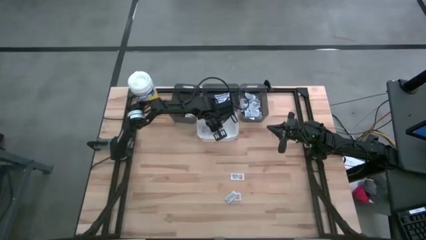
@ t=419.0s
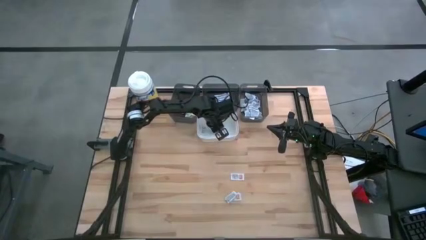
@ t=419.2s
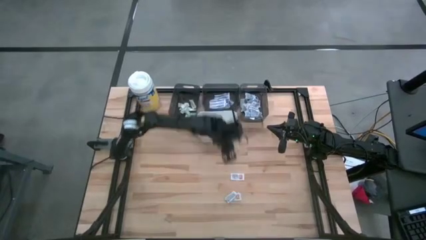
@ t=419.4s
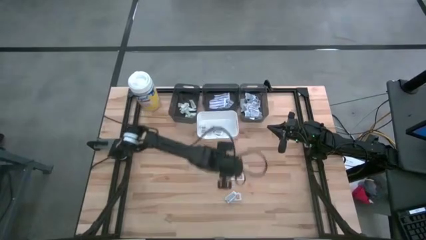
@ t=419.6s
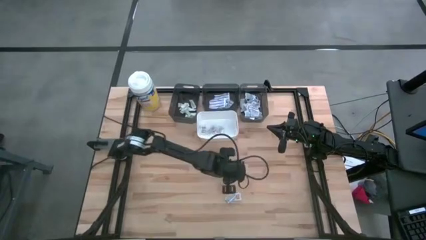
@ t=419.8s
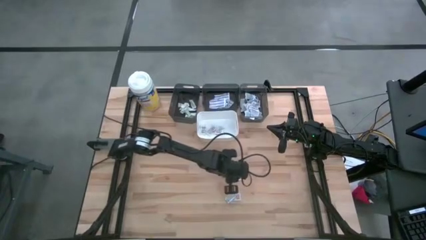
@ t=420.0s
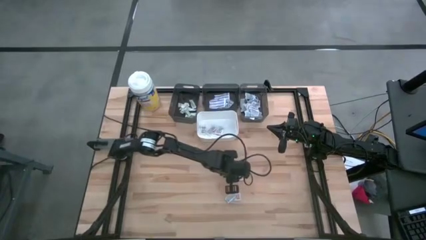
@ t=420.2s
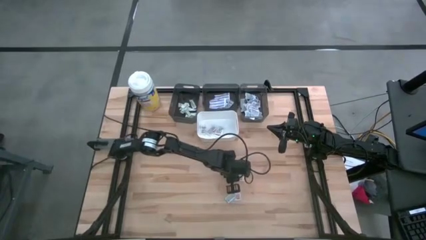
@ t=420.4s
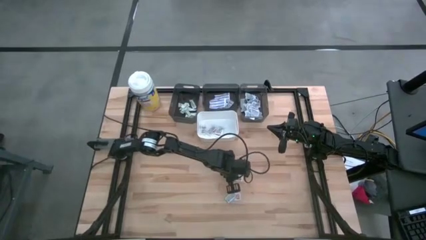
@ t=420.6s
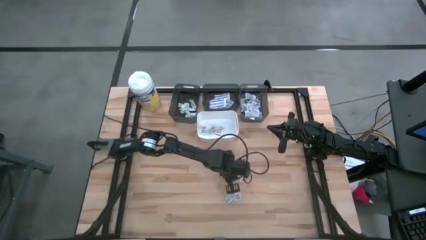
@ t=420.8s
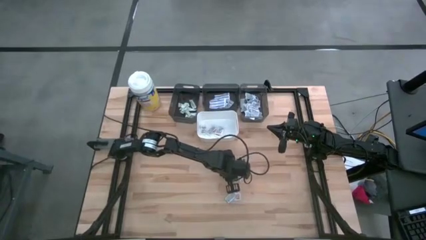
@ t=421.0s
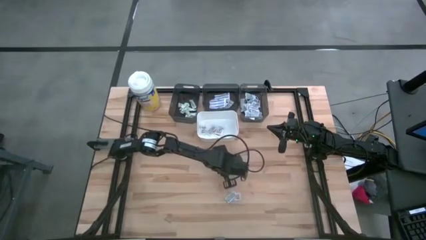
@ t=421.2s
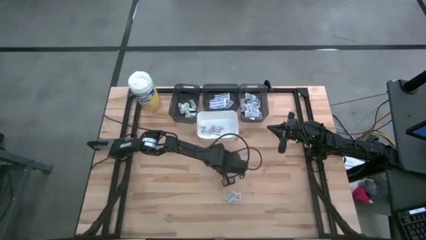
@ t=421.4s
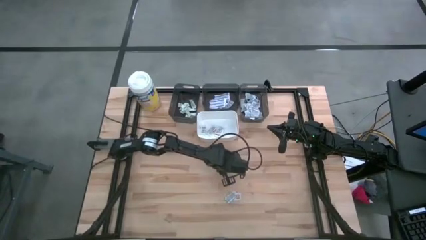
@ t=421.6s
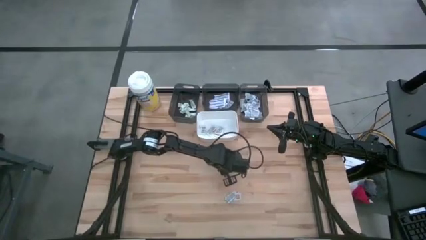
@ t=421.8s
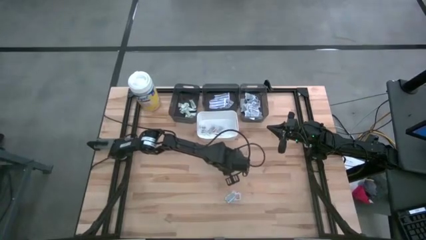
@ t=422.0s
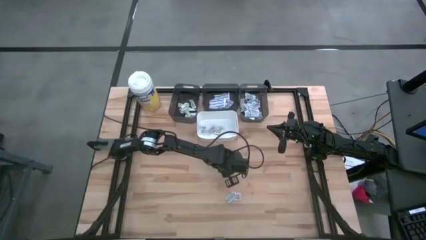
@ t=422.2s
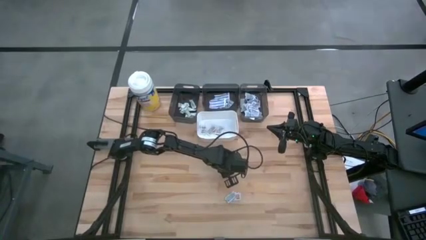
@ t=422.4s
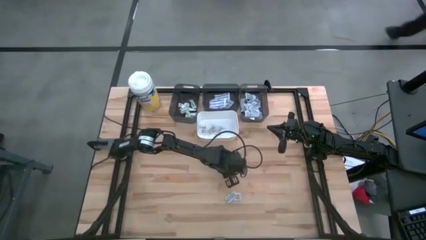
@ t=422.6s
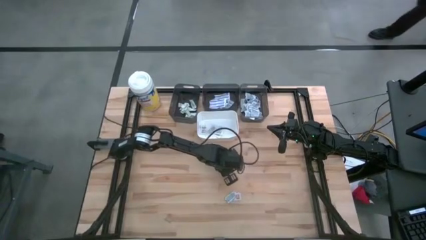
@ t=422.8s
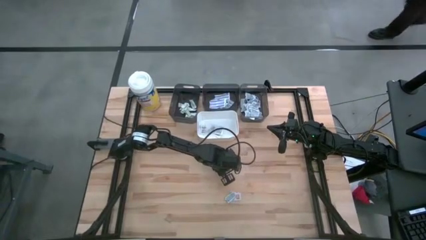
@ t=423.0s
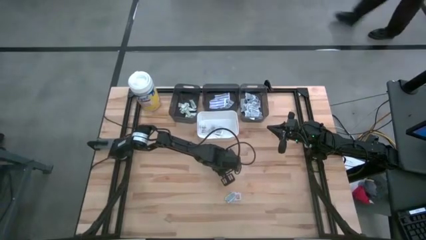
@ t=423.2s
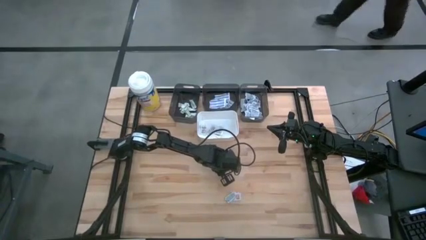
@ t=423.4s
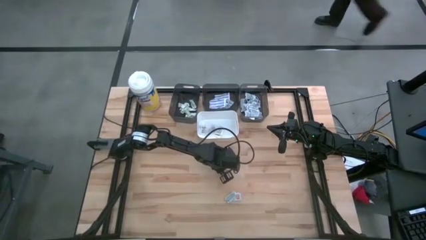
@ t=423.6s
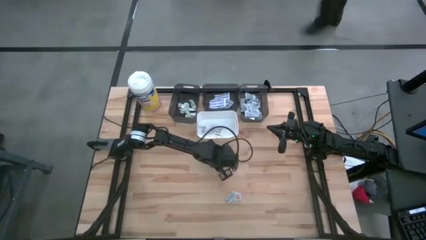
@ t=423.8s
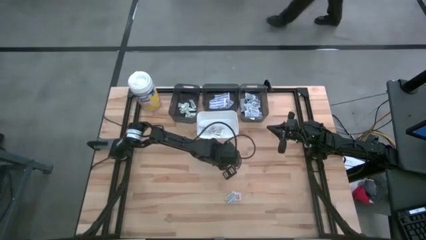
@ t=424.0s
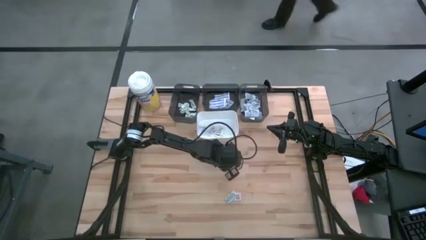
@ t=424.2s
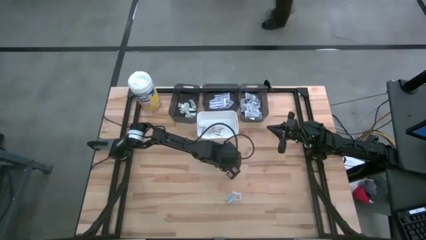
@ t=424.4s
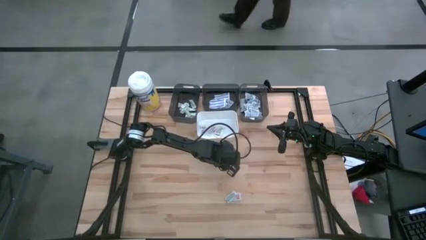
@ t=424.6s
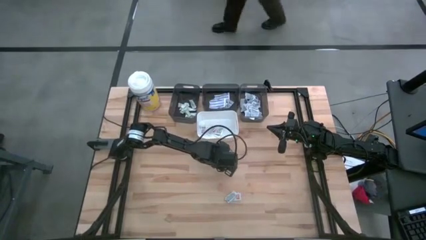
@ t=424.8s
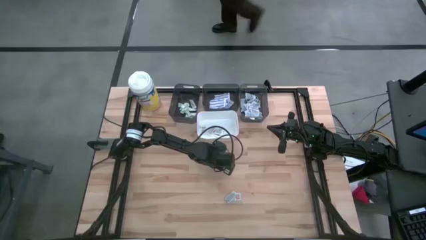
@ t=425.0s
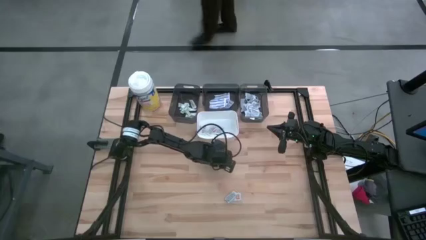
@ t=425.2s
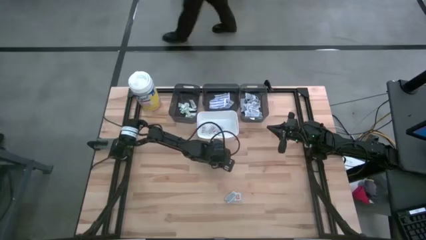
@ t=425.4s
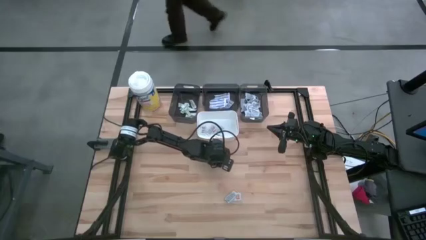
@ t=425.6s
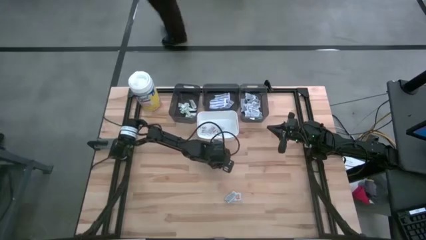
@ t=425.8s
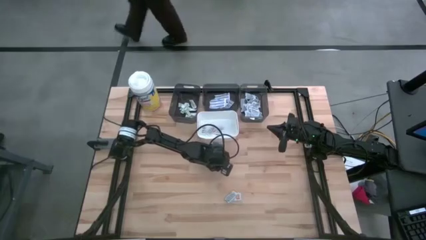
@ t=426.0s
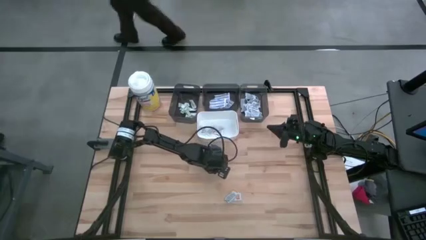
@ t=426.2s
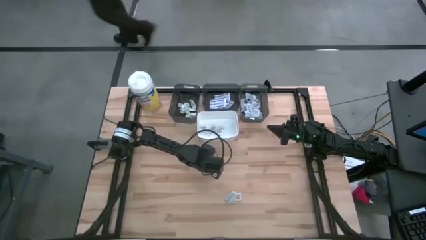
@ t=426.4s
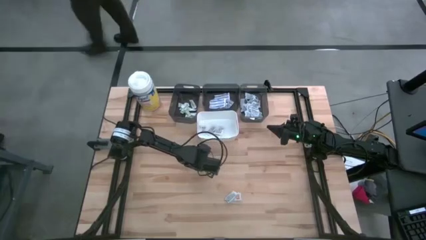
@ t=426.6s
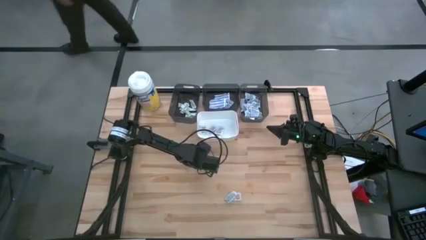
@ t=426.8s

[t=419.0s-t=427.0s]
Task: Pick & Place First Aid Supplies
Put the orange ointment pack into the white bin

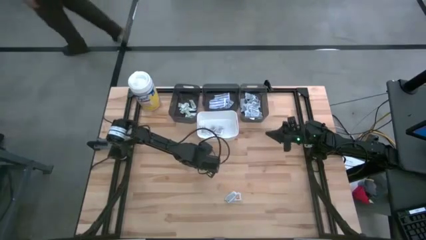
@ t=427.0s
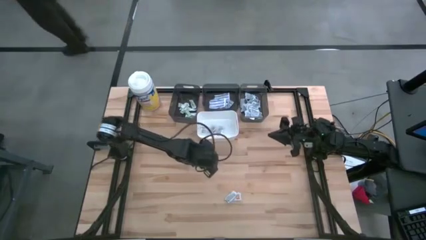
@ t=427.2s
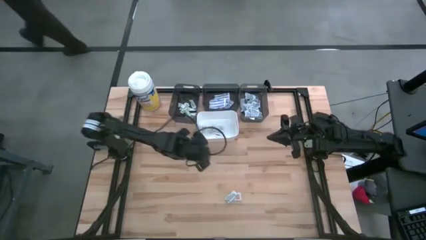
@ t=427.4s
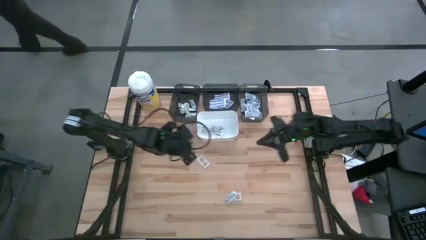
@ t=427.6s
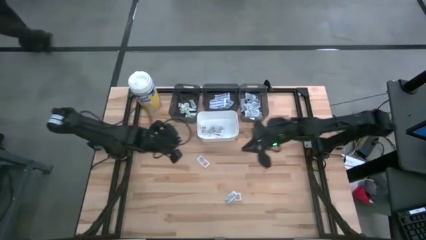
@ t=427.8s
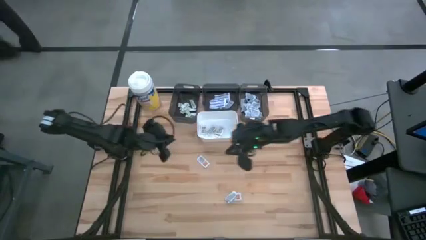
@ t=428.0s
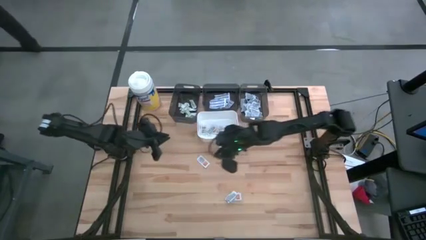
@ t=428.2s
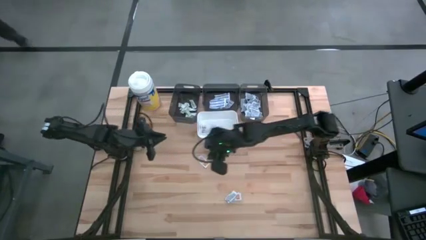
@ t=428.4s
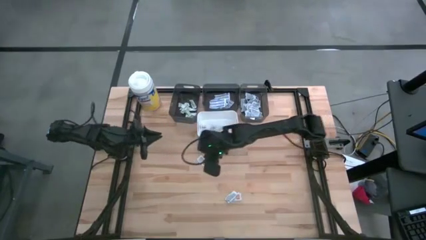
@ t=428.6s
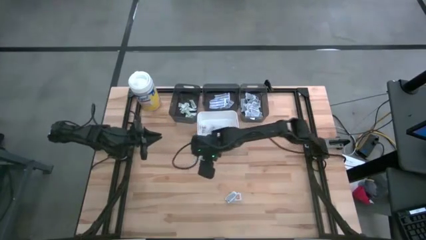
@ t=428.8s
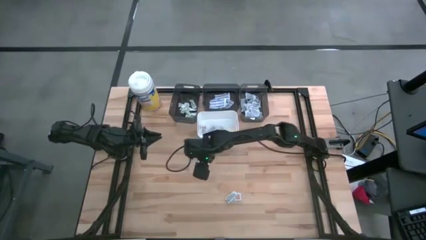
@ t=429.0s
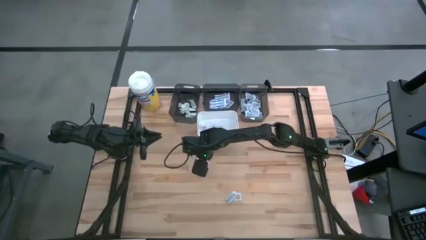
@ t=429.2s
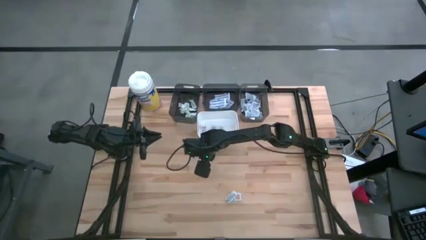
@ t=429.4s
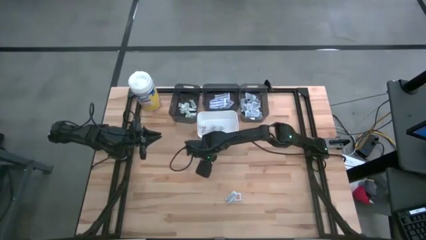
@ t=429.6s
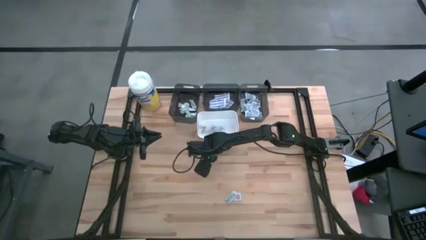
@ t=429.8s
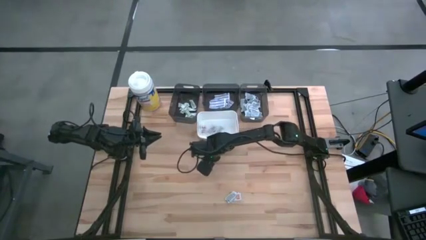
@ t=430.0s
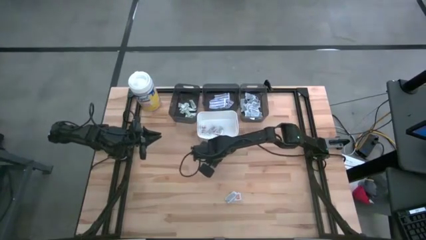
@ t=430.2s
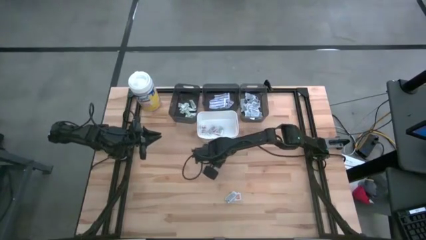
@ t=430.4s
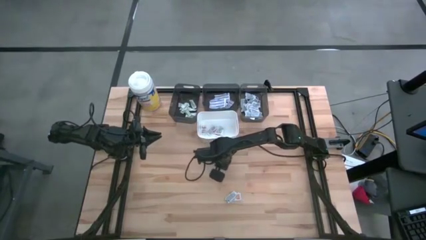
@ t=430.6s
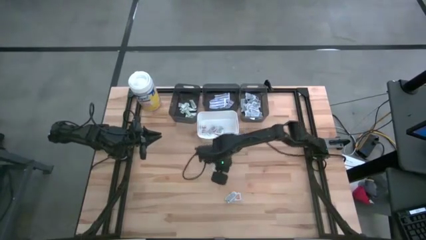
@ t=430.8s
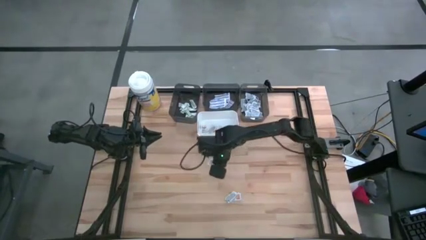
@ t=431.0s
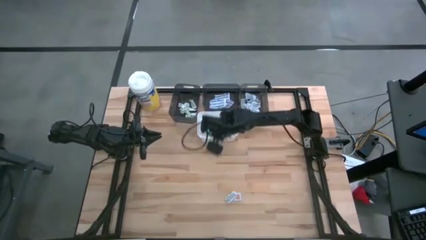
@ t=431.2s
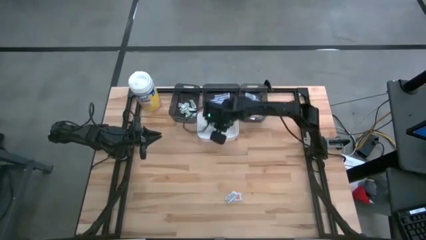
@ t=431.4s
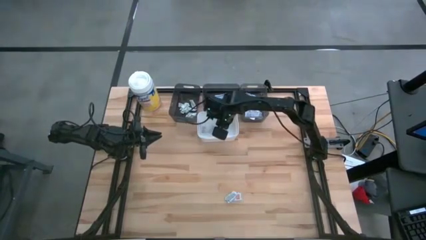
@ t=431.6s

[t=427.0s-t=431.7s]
Put the orange ointment pack into the white bin

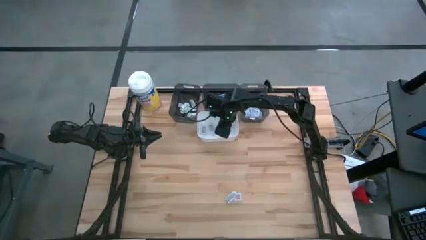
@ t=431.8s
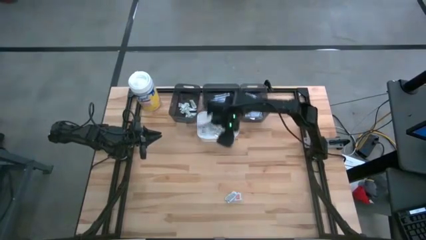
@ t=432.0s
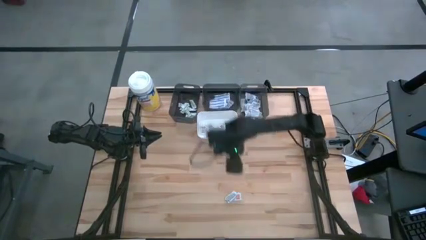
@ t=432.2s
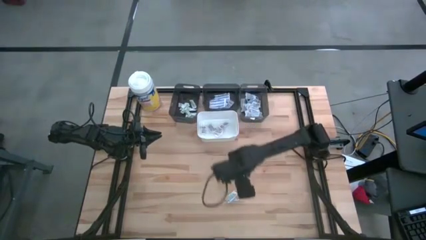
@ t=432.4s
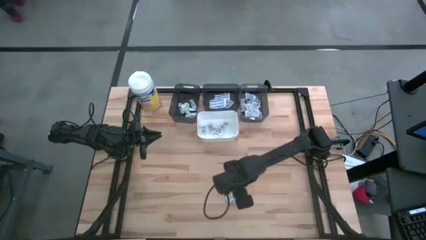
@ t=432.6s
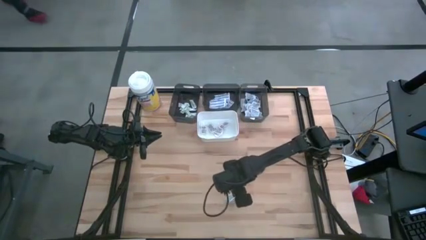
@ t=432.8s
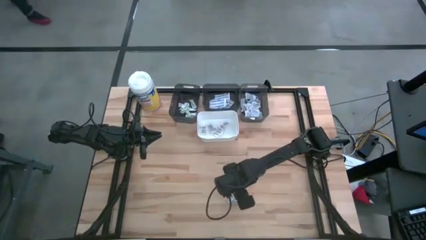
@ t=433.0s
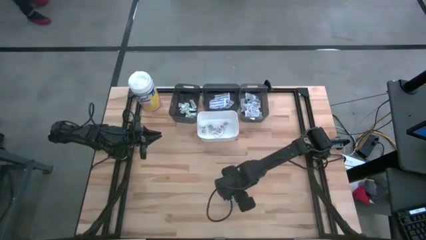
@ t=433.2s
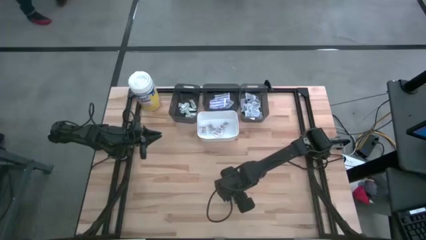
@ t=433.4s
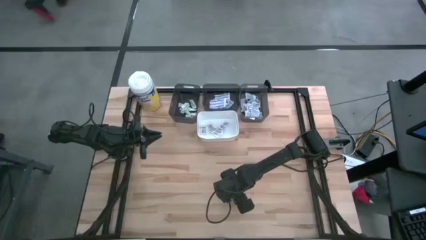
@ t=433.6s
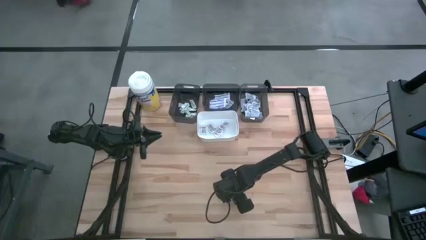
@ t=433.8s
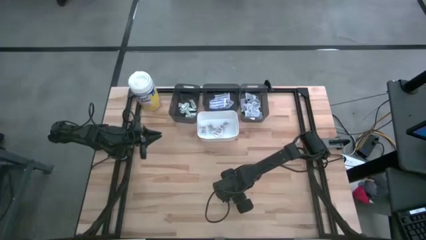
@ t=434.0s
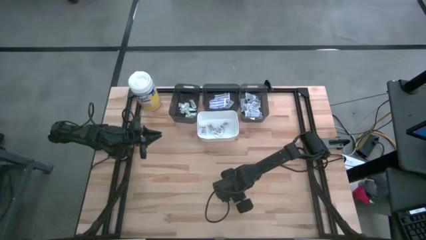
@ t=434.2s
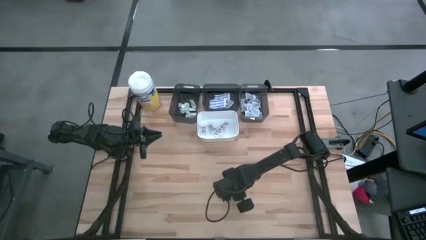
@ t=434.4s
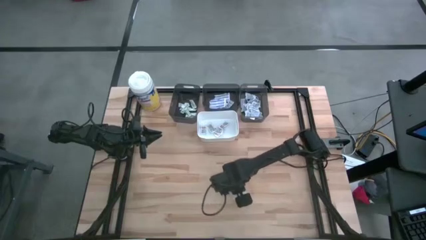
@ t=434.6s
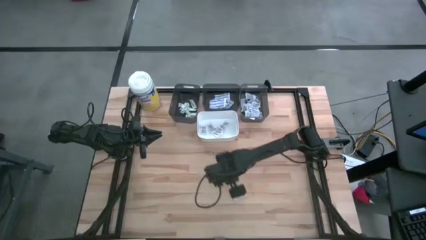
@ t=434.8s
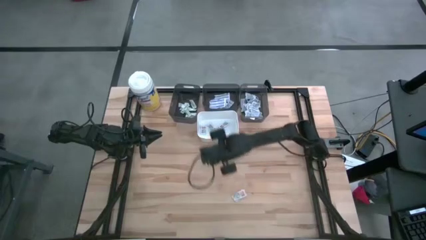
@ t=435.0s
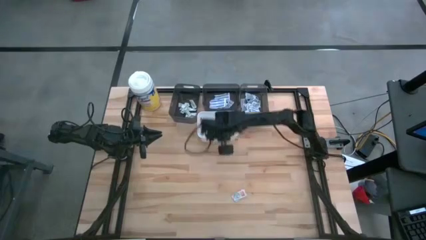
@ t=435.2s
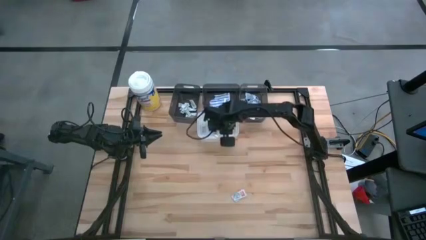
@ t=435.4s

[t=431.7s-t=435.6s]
Put the orange ointment pack into the white bin
